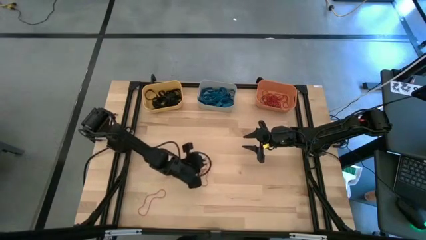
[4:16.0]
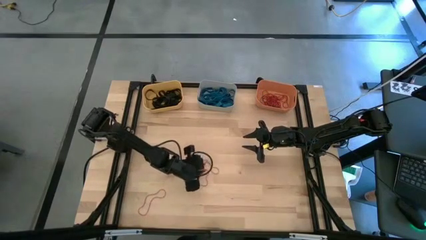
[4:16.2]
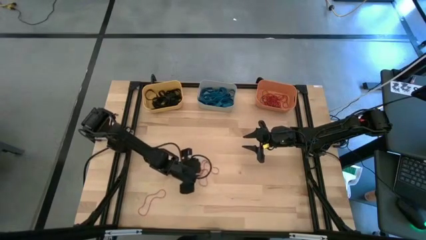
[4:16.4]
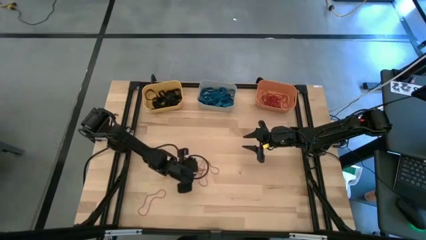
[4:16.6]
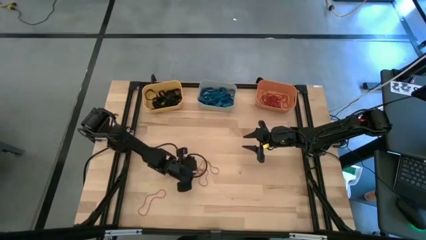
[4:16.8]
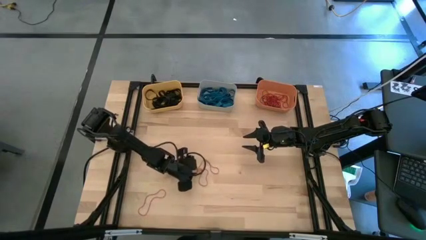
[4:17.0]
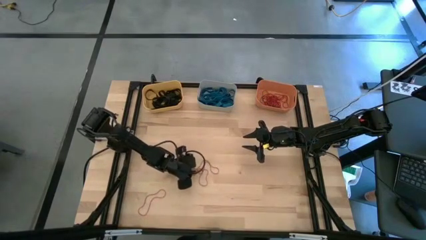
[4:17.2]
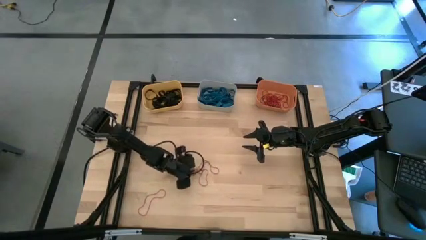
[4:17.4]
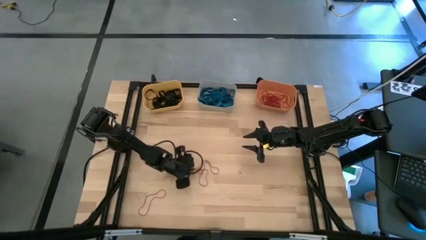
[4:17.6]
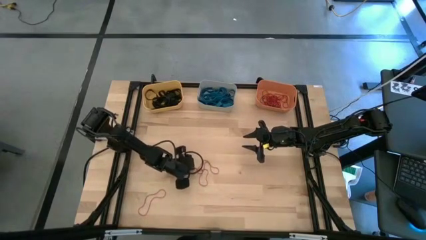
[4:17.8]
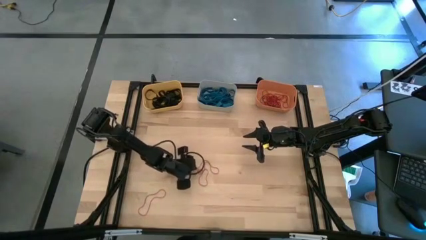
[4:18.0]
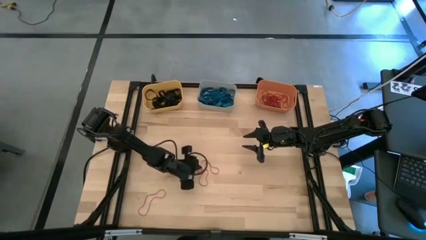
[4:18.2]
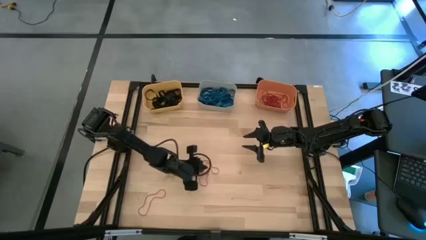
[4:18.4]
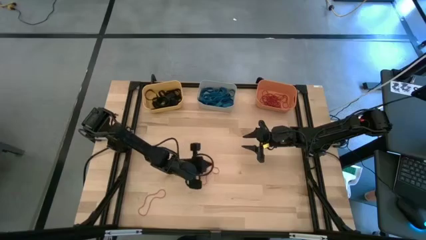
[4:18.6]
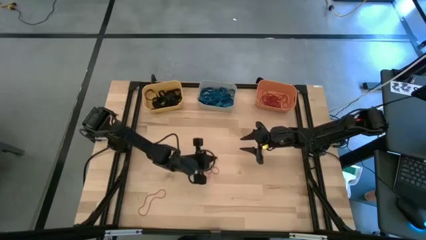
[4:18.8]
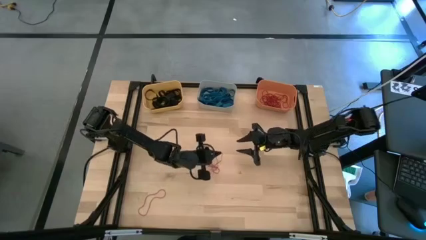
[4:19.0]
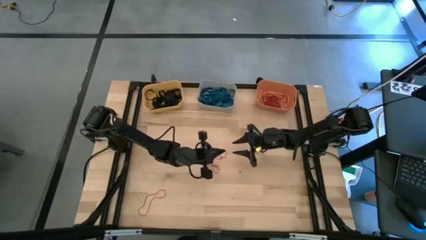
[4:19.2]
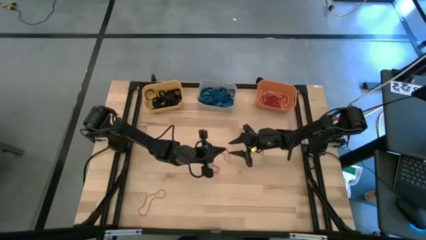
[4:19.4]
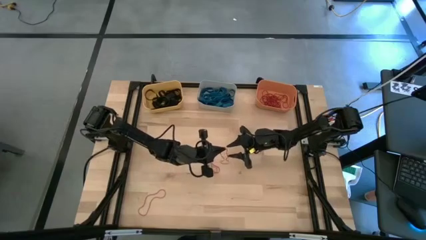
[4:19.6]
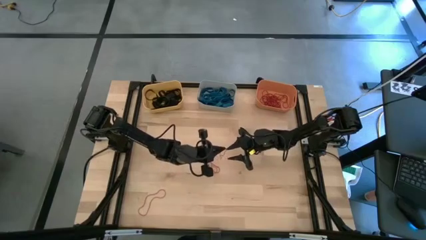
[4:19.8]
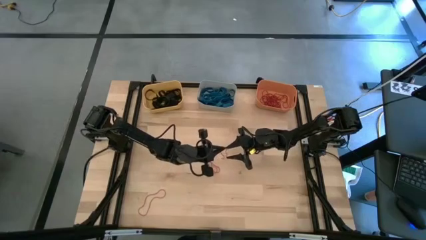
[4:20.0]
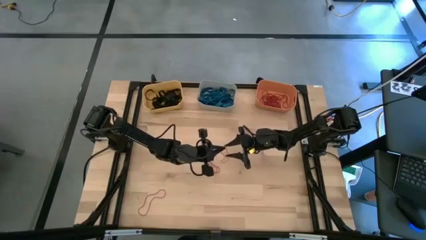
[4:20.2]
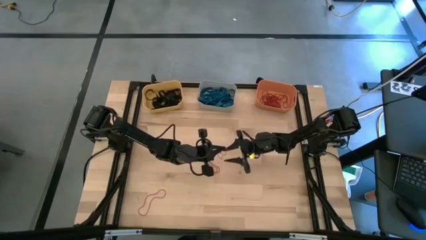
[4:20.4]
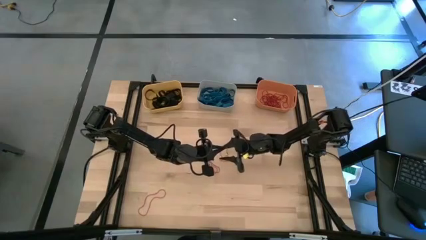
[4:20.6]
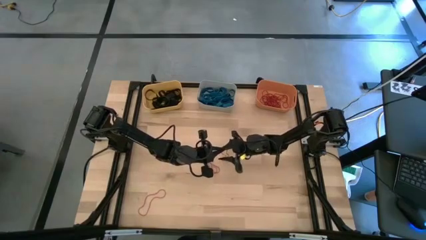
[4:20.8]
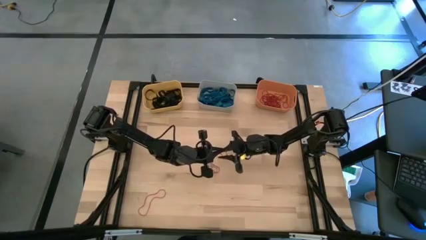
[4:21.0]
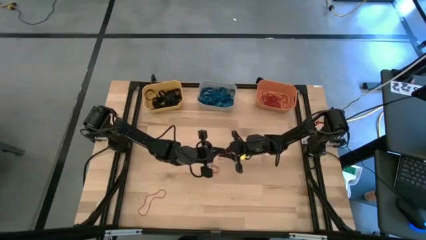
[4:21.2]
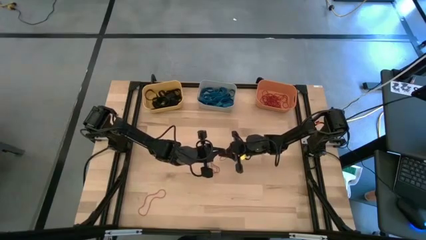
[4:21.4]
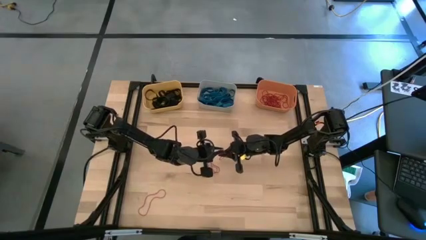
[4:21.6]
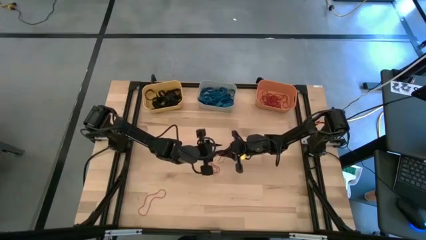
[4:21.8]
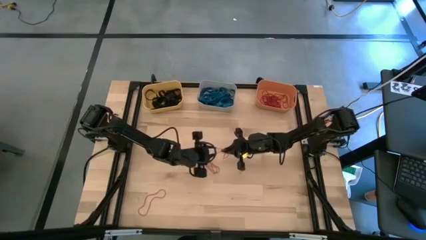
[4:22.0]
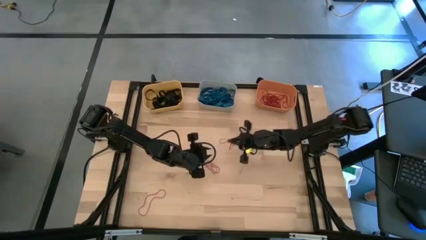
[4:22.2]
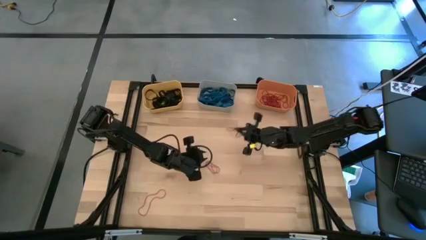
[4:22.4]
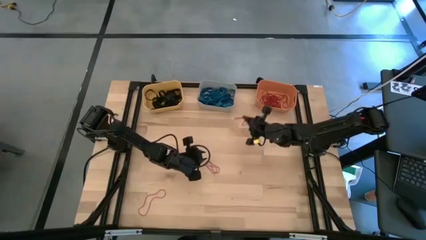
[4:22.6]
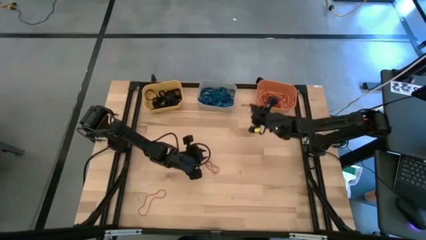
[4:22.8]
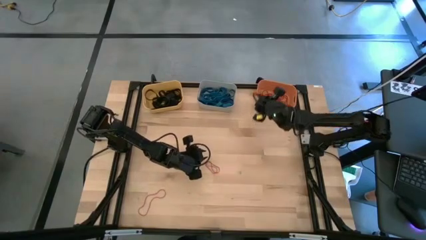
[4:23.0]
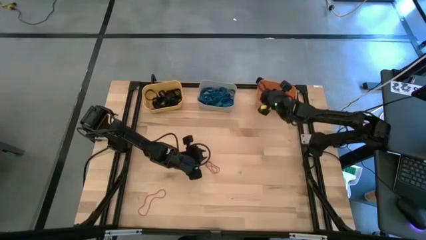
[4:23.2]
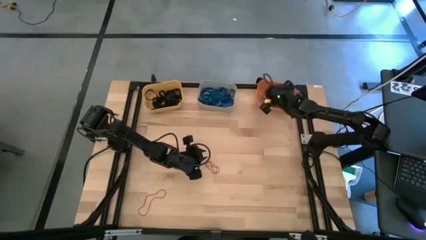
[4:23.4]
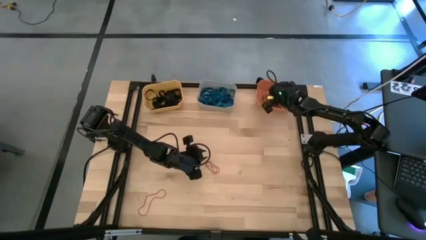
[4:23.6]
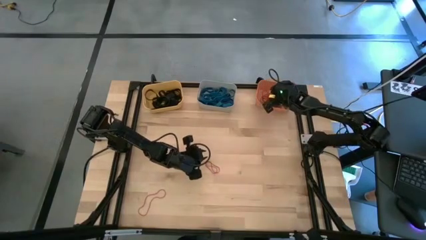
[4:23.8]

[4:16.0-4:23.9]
Task: Sort rubber bands into baskets
Put the red rubber band into the orange bin

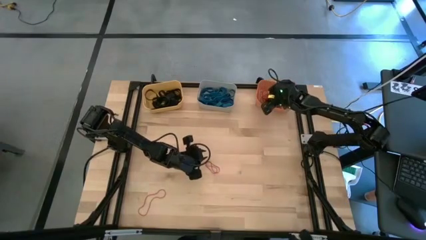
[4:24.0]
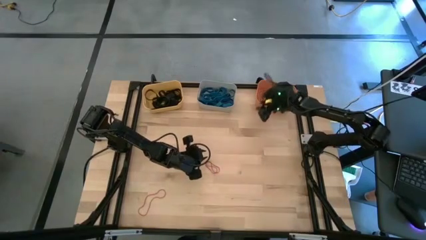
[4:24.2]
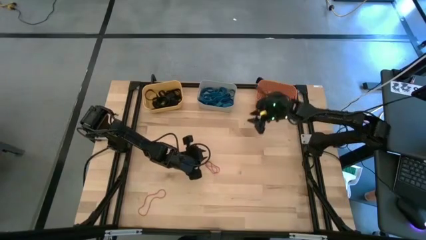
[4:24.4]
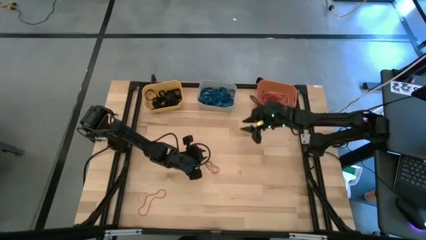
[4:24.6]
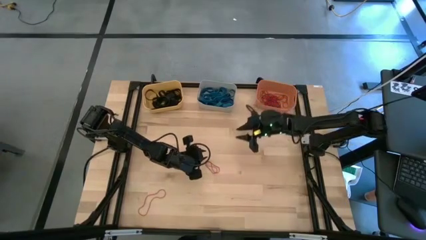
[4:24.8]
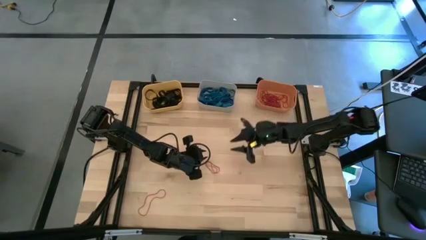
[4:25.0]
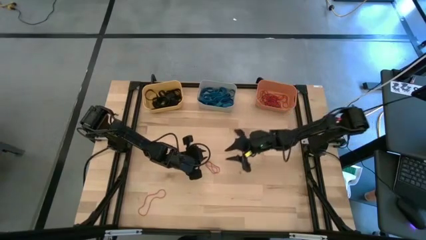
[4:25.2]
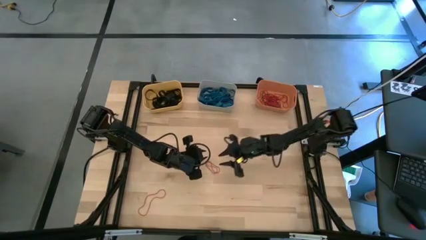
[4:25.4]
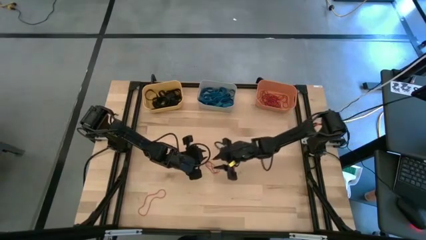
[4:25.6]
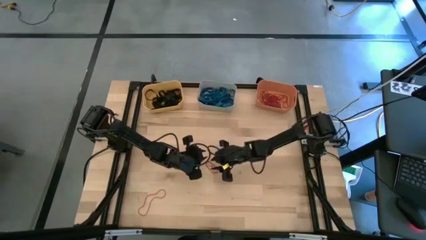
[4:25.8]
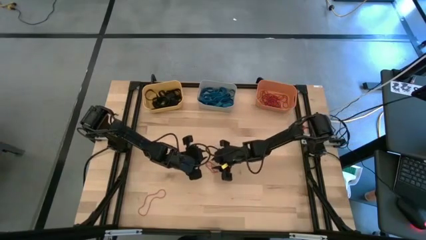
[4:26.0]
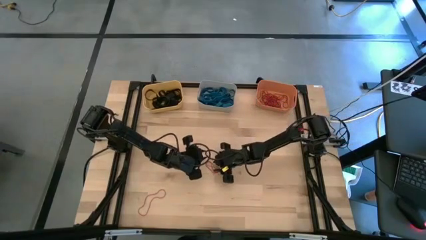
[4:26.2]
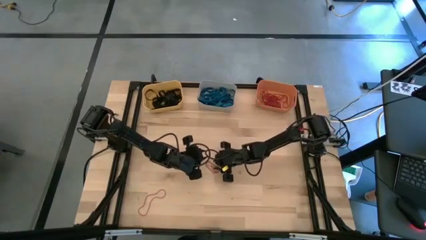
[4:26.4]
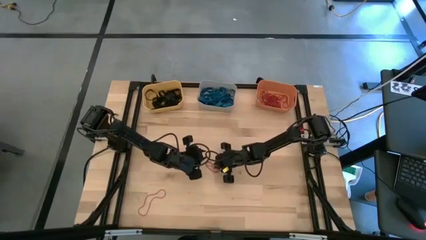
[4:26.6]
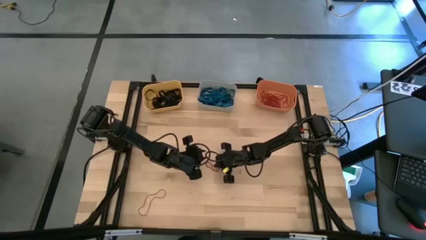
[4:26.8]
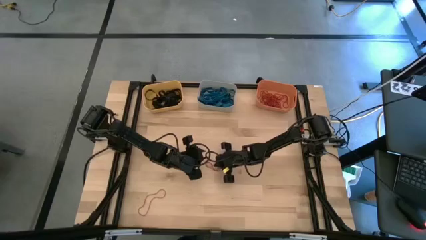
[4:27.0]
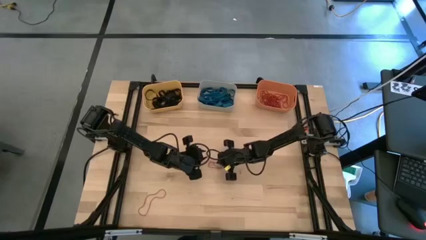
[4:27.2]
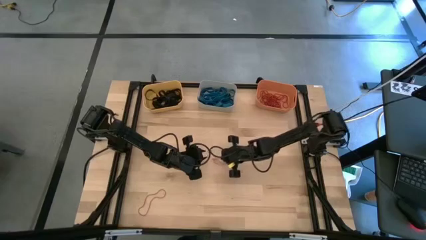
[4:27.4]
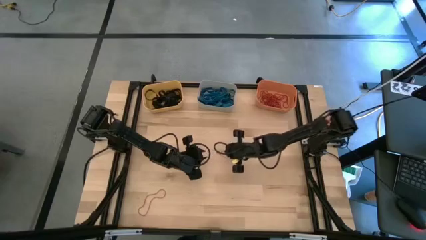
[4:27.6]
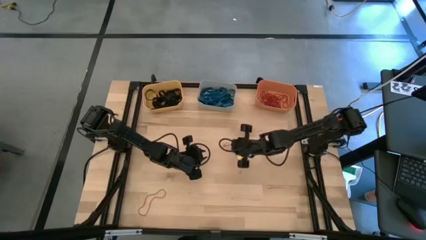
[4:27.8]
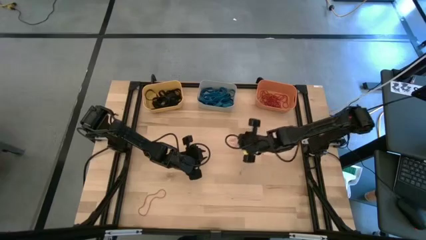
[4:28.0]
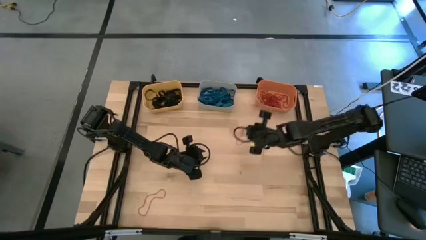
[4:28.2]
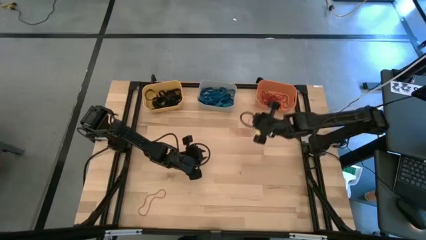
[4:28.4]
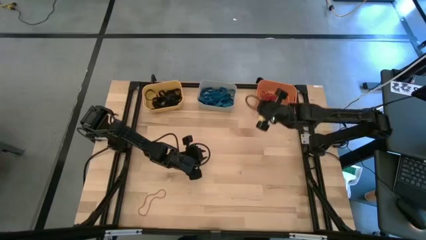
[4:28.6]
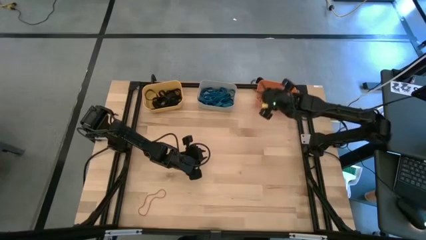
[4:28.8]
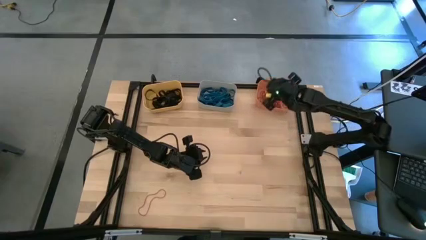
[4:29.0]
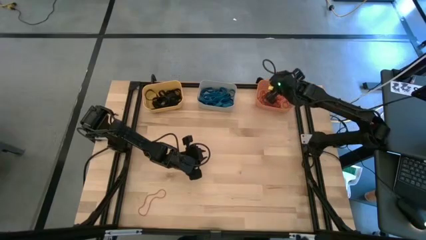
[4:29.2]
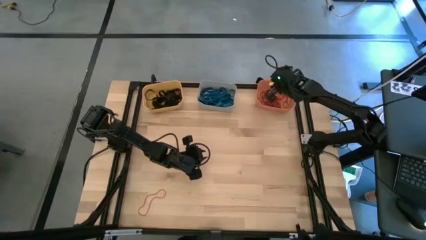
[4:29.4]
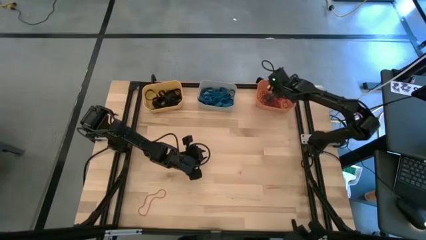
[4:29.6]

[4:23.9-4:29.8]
Put the red rubber band into the orange bin

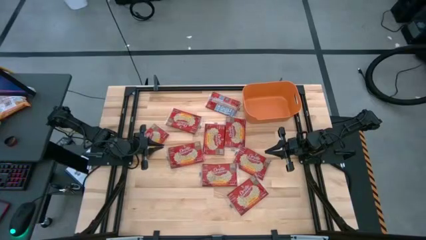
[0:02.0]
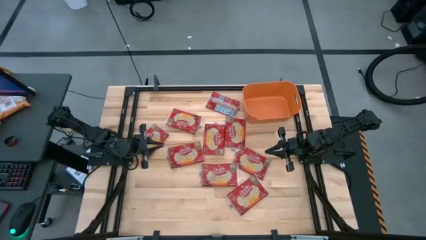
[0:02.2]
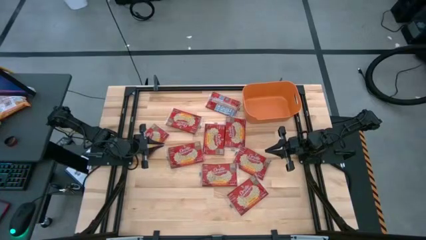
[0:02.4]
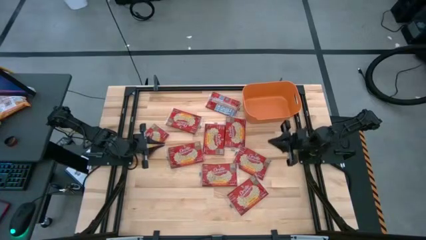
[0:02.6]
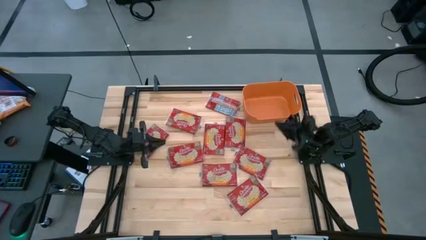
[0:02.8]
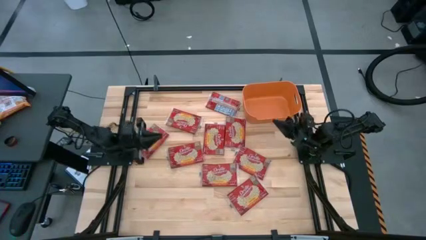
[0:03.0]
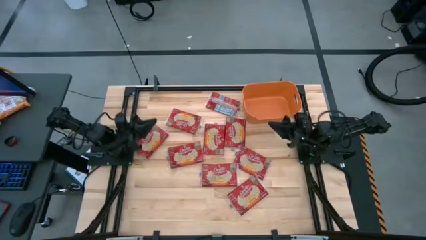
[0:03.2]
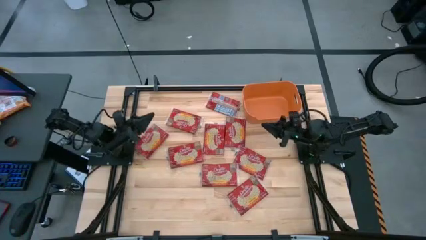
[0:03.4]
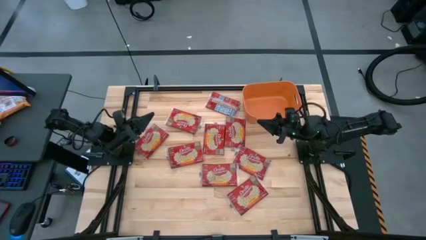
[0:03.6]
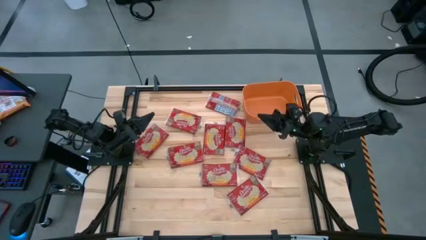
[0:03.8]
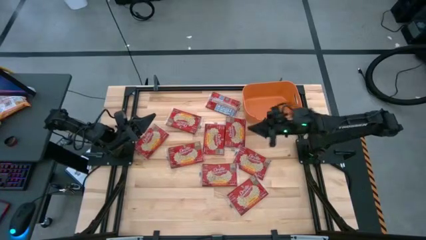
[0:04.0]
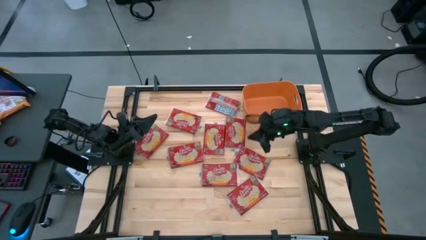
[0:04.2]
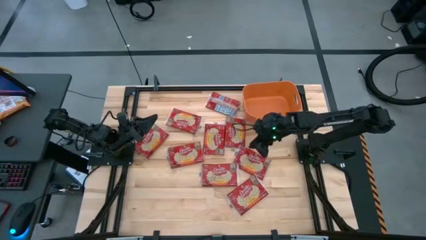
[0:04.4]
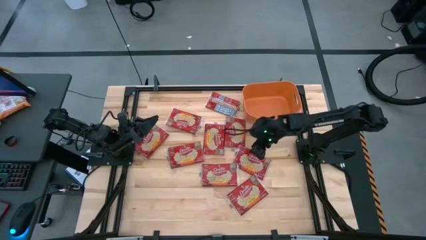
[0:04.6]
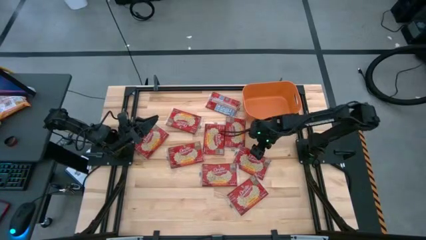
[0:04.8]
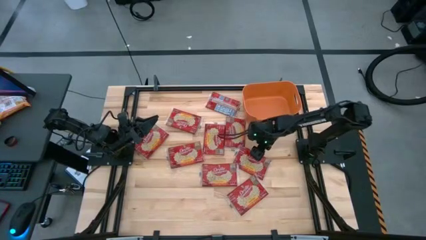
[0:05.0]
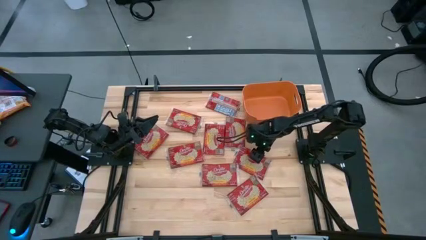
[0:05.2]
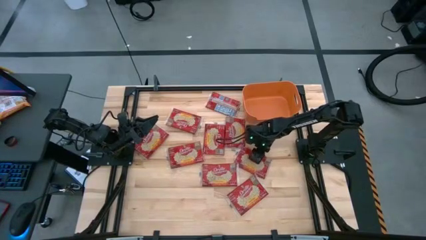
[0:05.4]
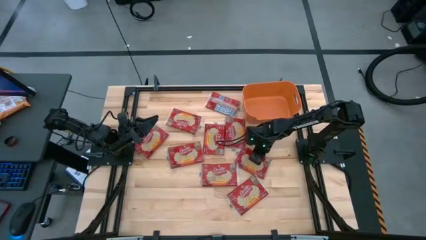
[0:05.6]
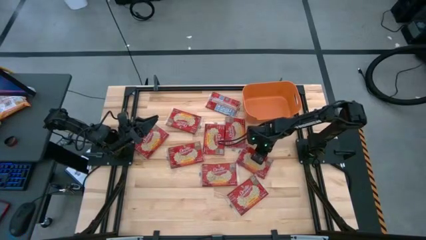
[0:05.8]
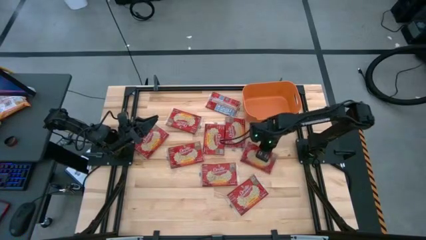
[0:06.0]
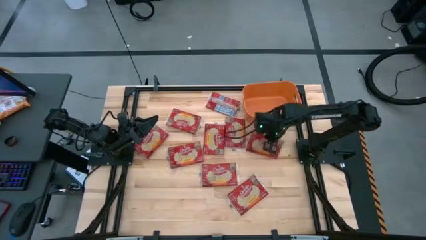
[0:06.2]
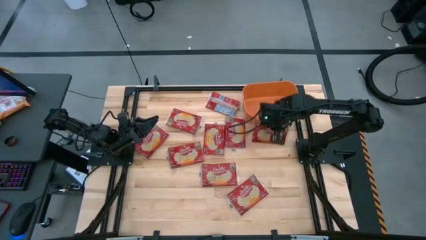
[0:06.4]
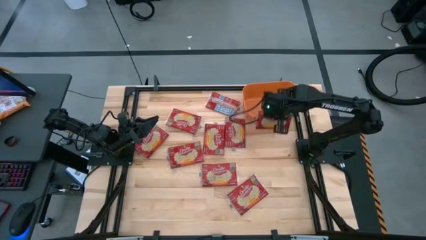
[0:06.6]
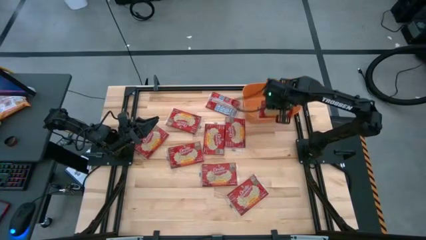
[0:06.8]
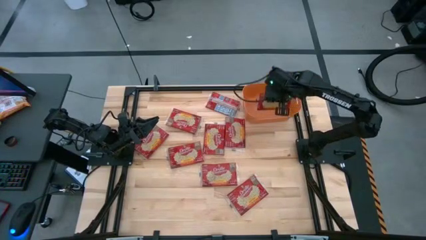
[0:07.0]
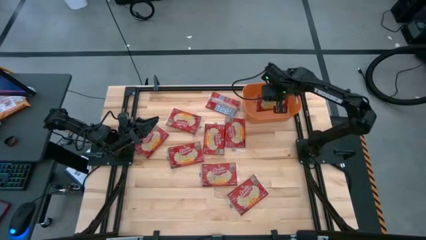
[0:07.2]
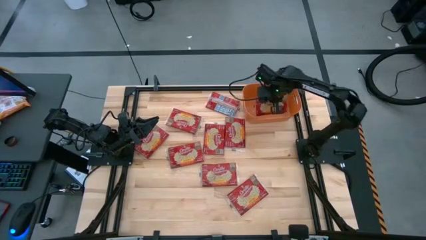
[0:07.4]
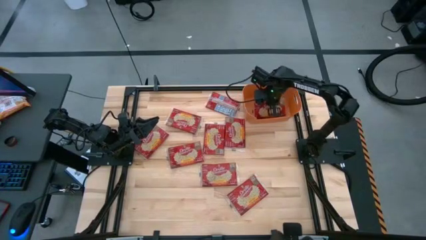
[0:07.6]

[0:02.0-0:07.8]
Task: Sort popcorn bags into baskets
Put the red popcorn bag into the orange bin
